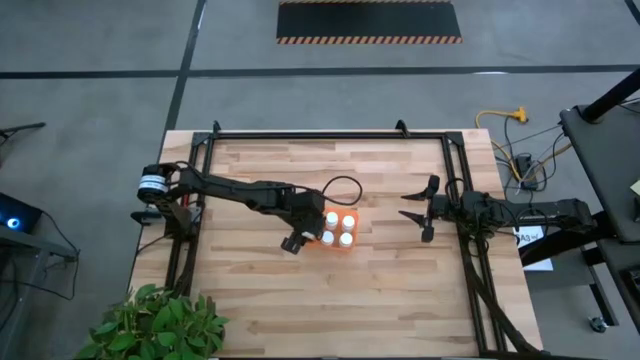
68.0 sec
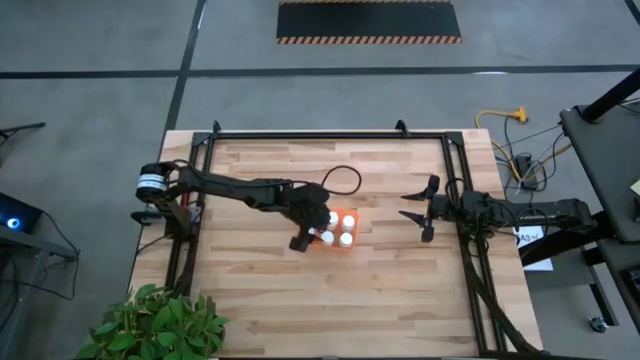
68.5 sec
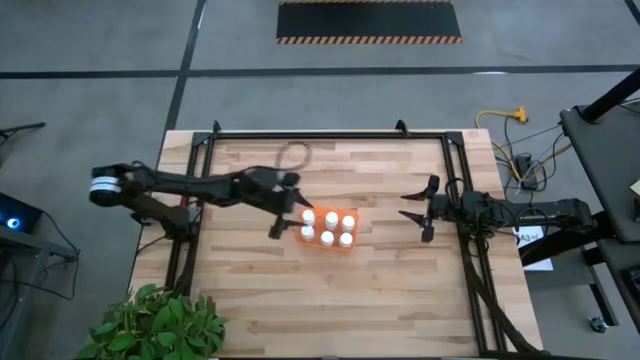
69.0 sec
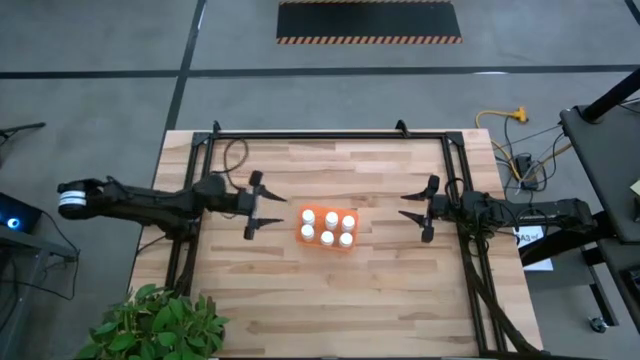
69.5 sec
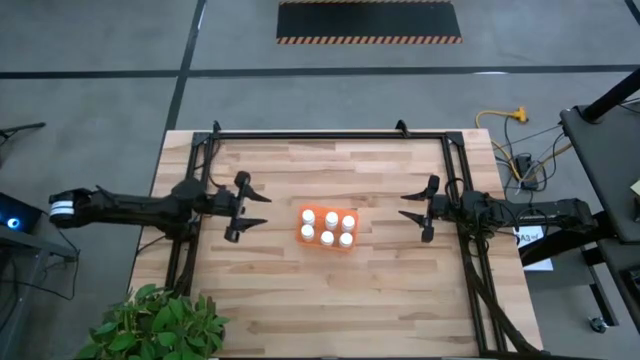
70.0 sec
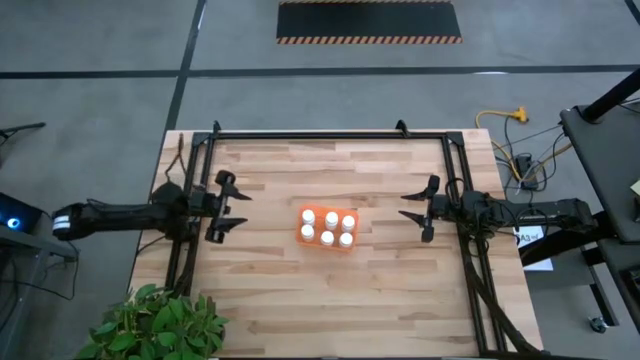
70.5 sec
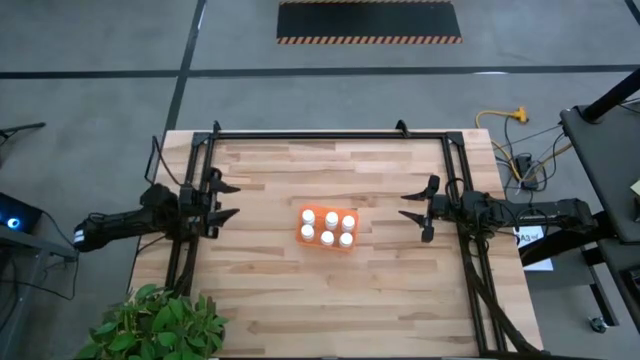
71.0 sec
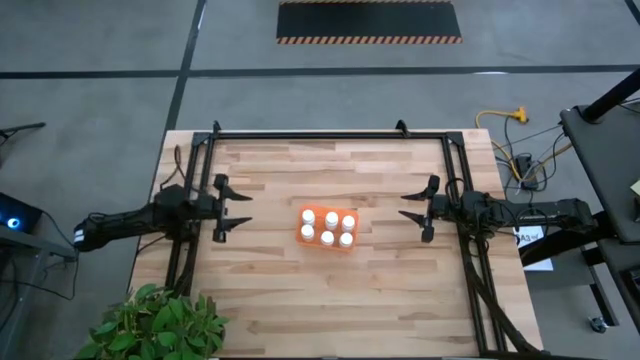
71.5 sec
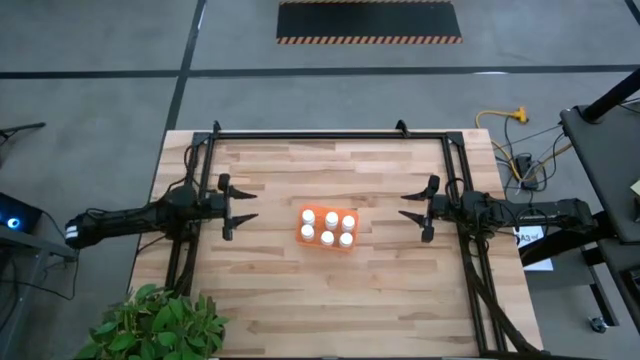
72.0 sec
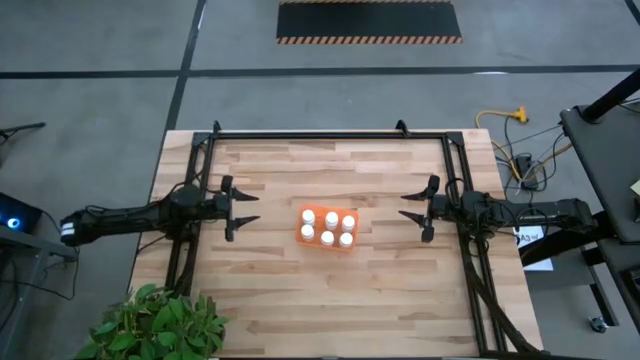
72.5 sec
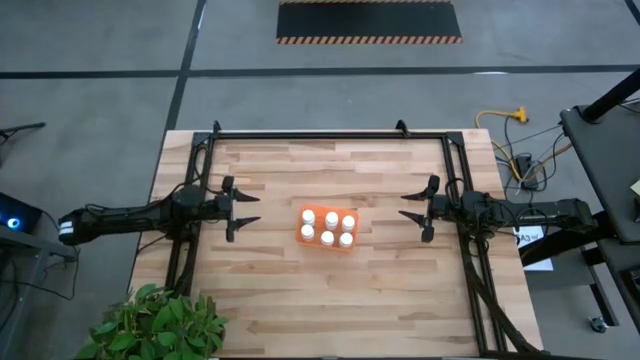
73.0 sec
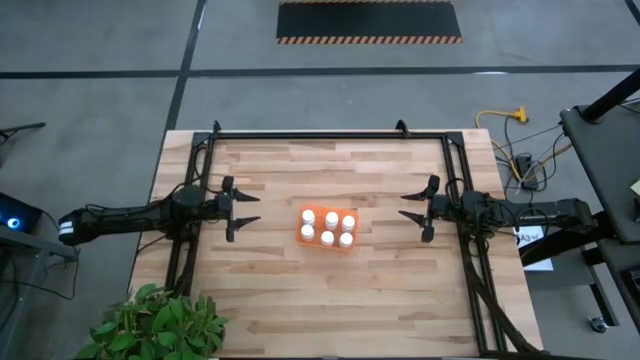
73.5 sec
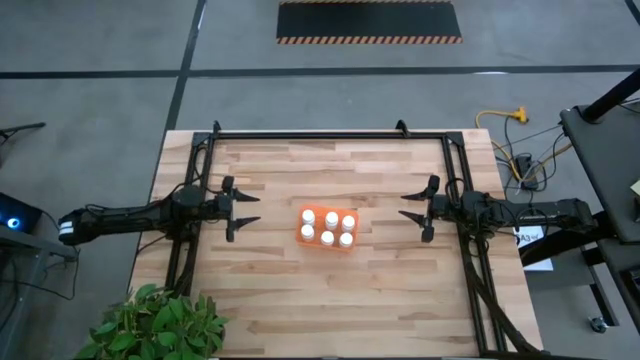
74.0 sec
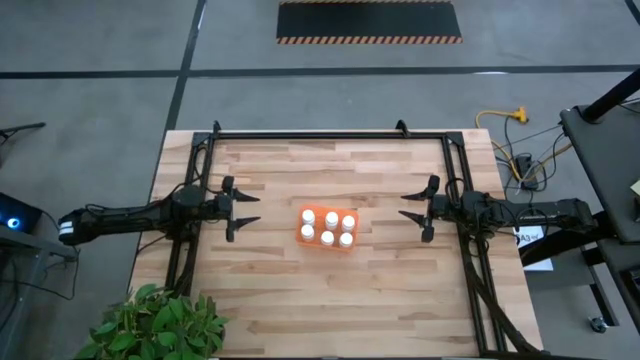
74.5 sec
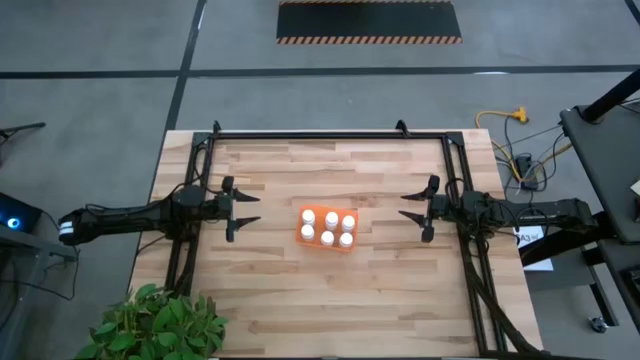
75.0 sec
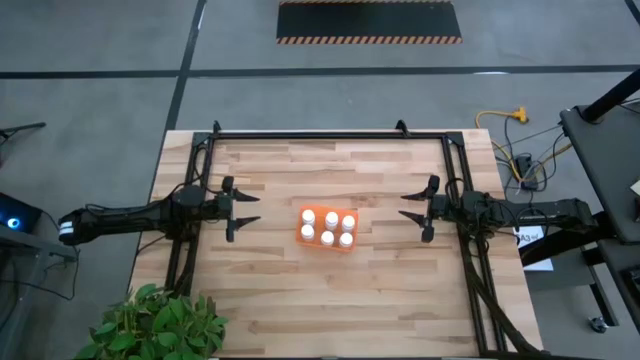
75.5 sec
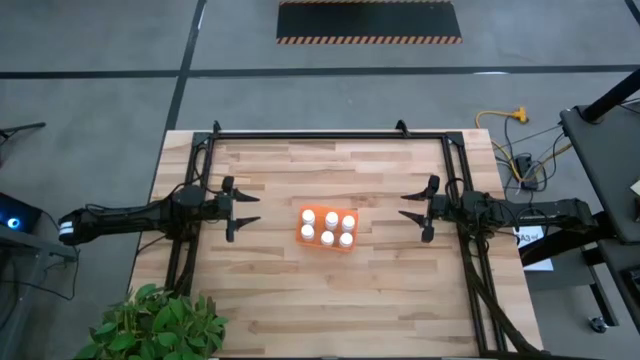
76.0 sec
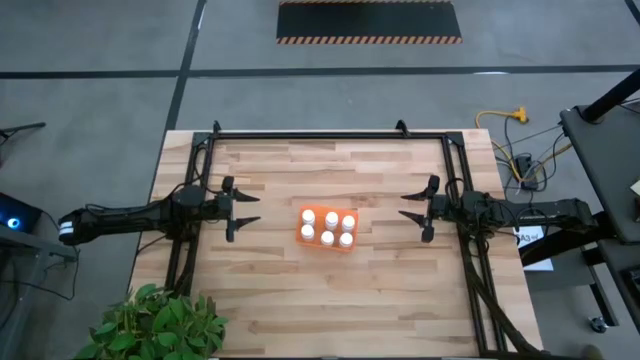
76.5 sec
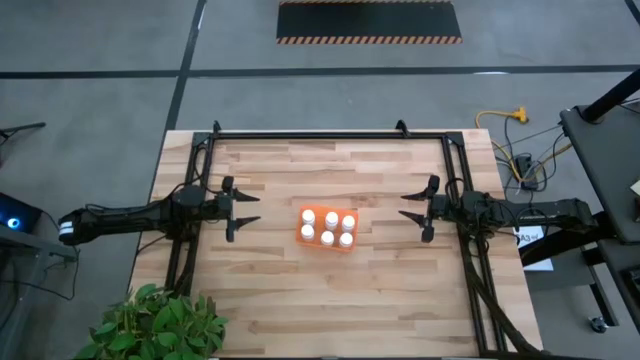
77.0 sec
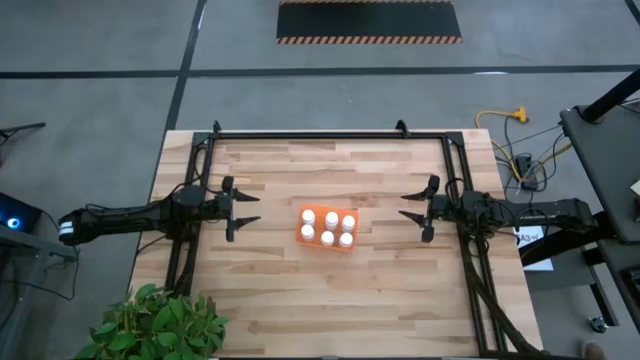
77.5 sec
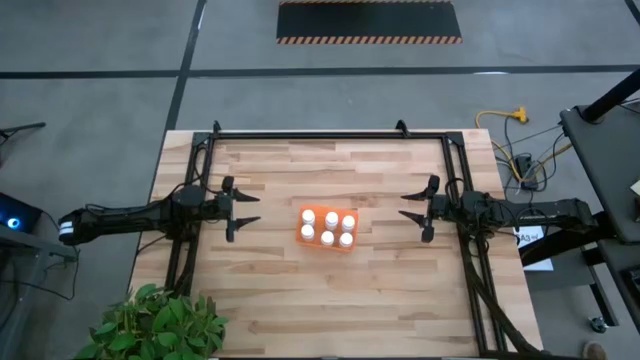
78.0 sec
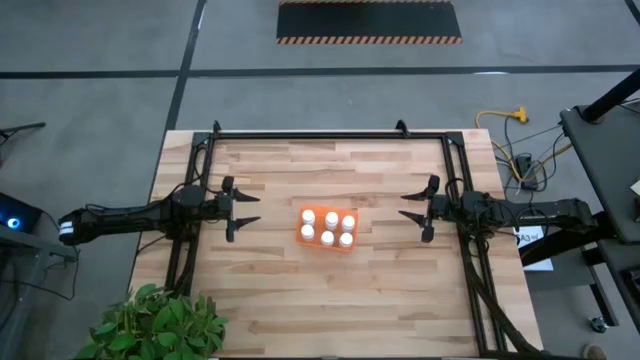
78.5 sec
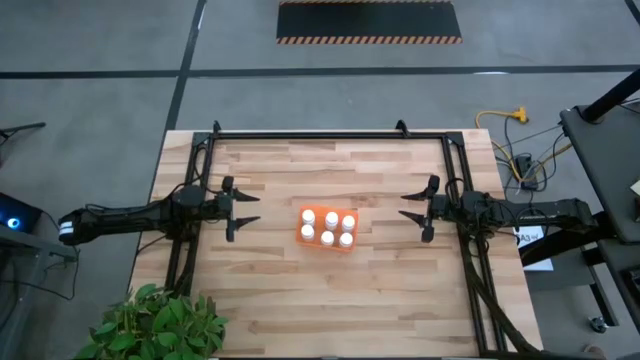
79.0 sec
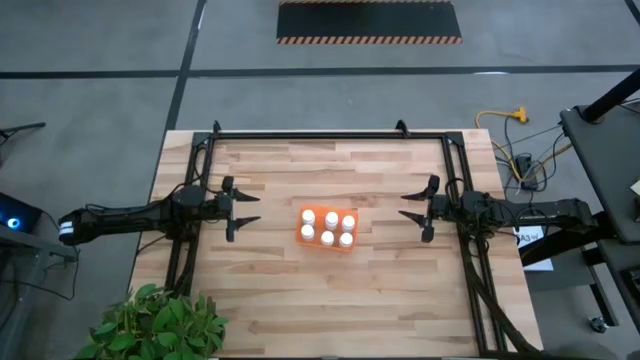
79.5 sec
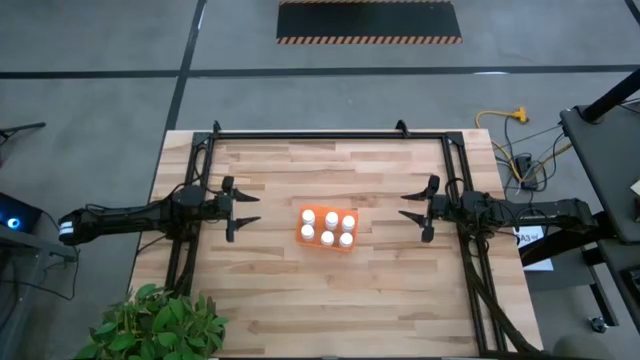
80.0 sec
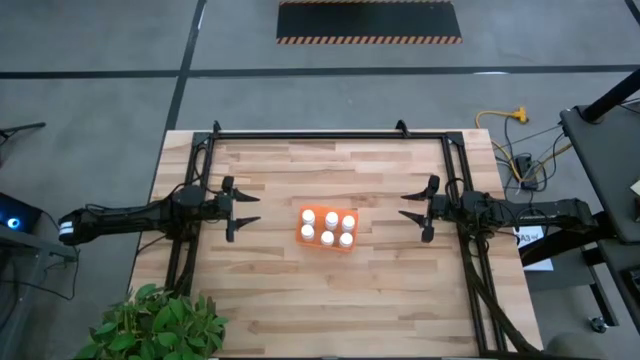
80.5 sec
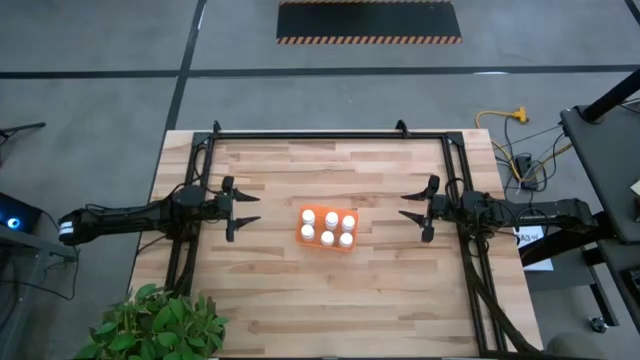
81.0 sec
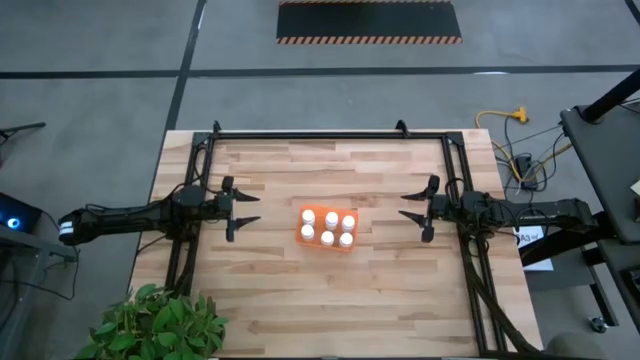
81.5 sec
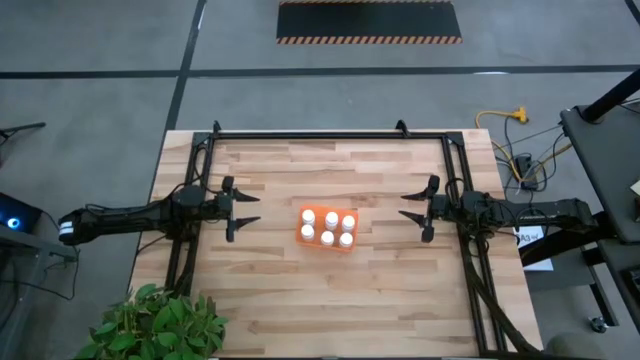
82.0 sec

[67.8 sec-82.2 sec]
Task: Pick and place pill bottles into a basket
Return to Home Position

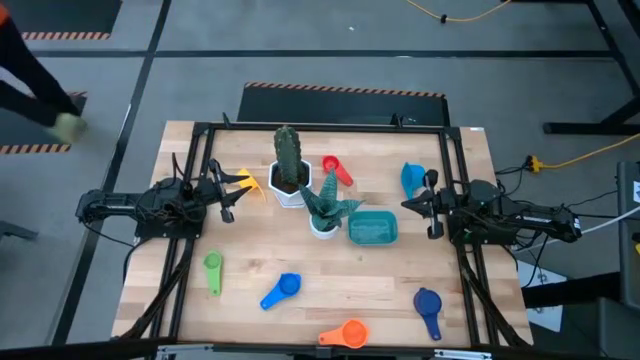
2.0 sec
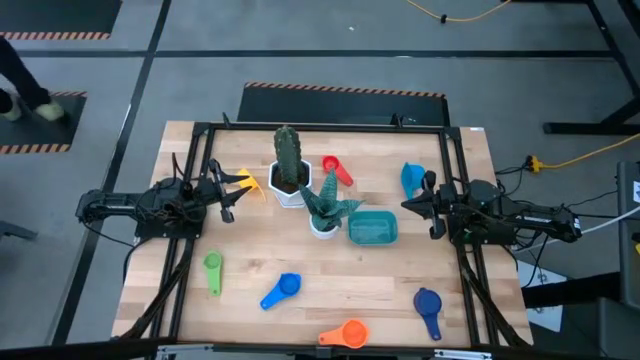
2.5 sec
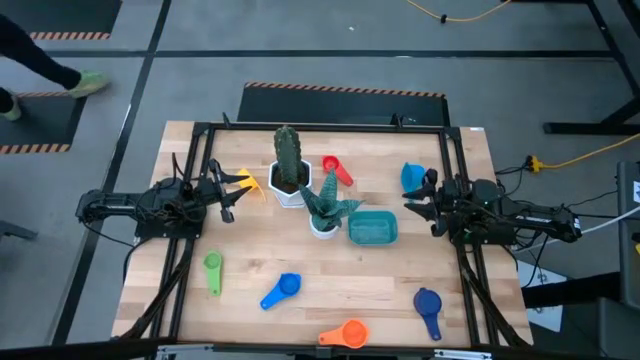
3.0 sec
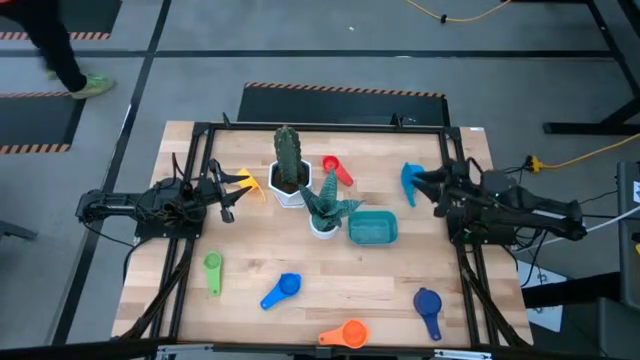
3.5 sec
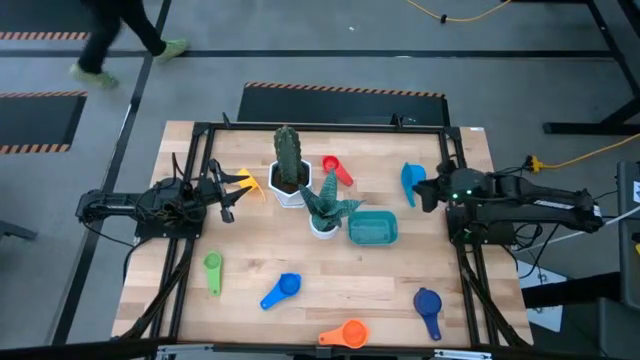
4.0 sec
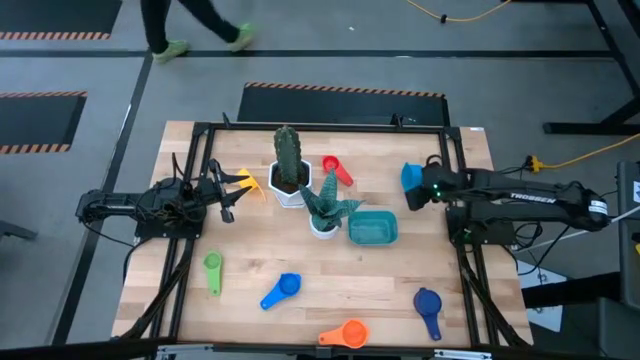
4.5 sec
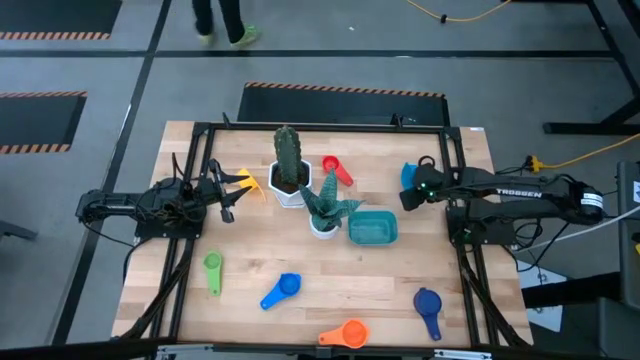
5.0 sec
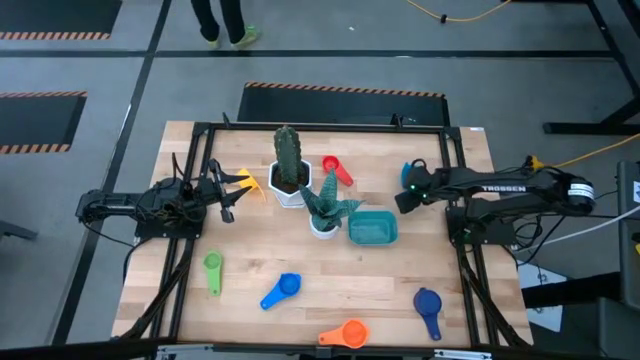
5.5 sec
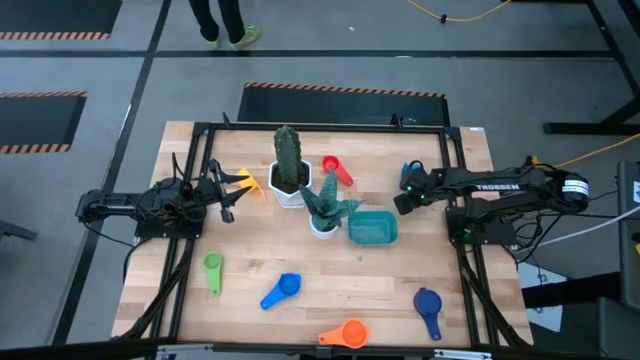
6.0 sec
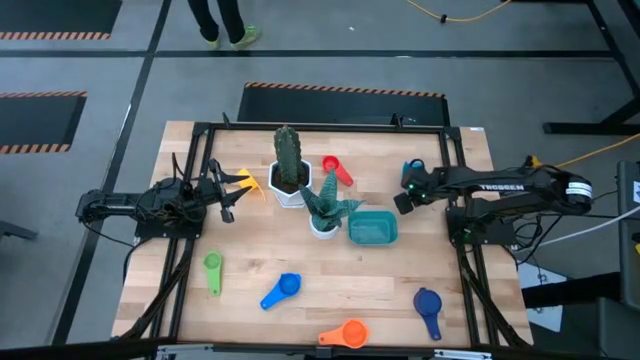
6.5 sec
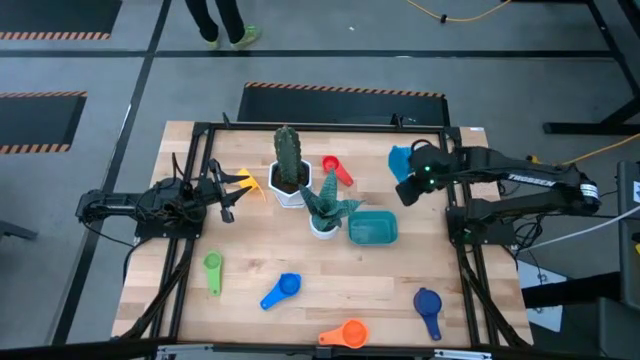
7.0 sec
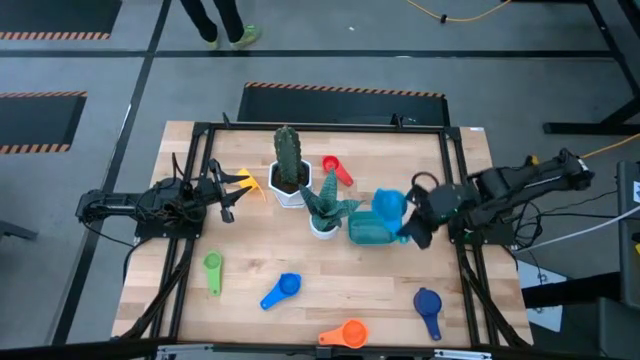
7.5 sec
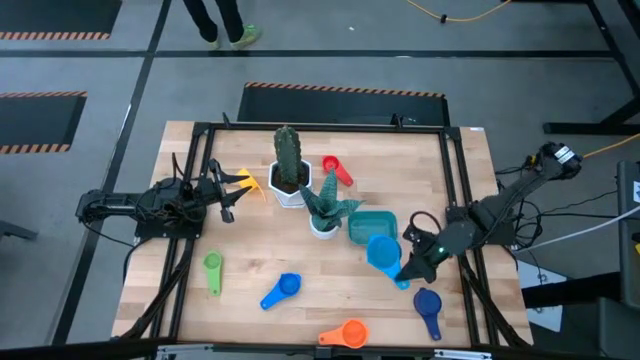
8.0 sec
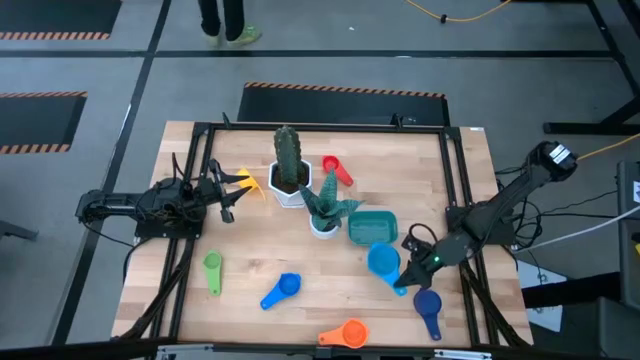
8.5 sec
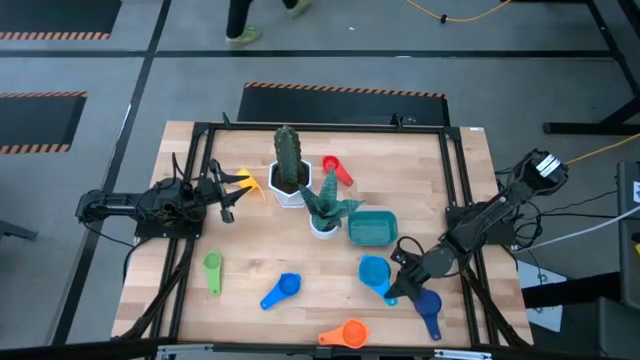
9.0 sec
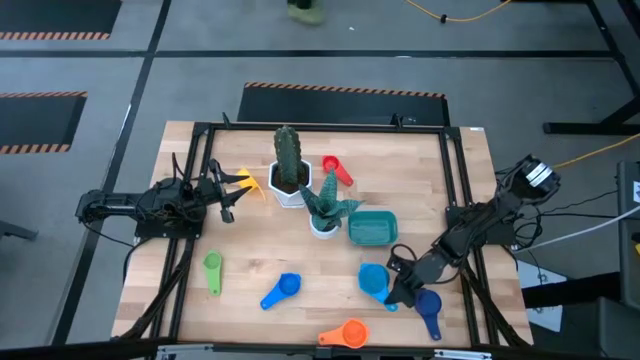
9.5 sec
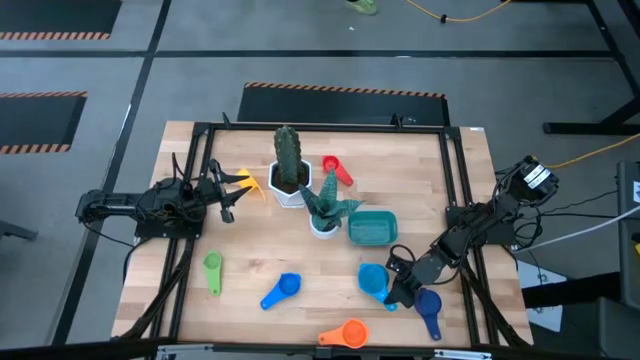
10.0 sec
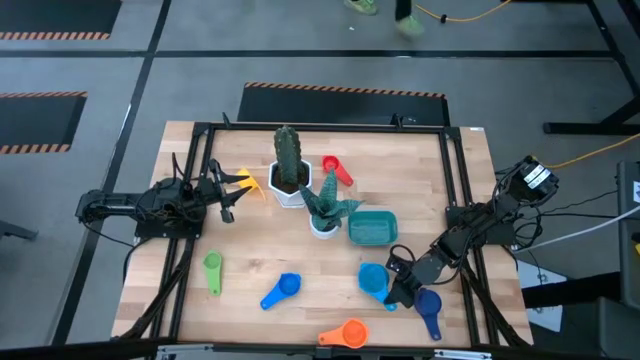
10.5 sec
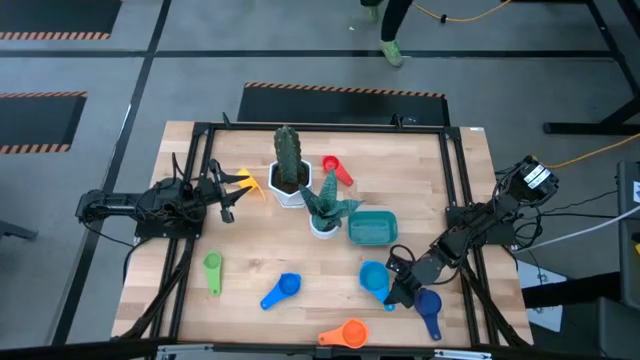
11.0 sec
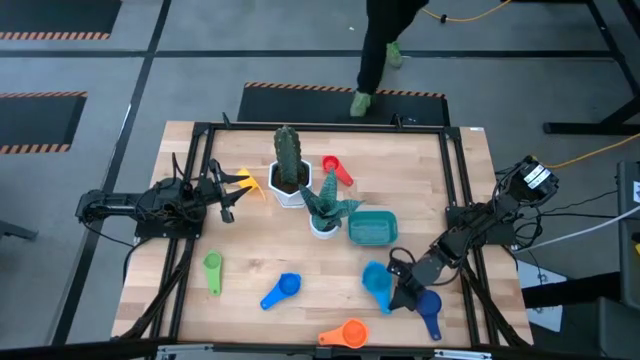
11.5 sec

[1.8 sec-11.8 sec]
Task: Nest measuring cups in basket
Move the light blue measuring cup to the bottom middle of the table
